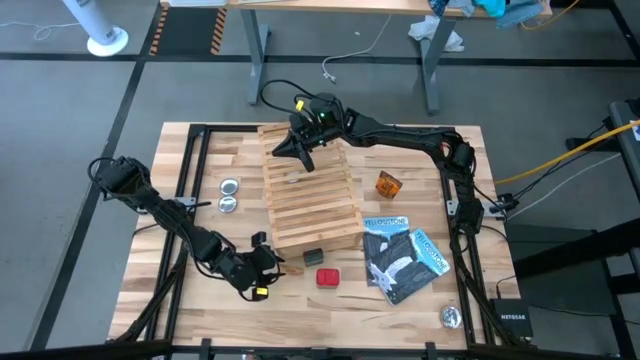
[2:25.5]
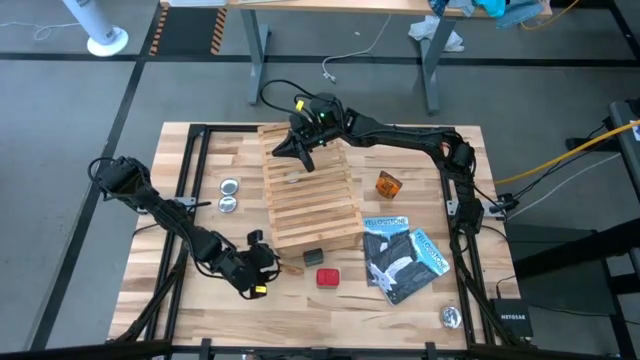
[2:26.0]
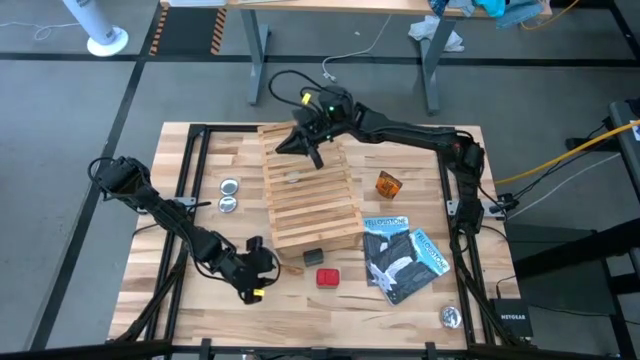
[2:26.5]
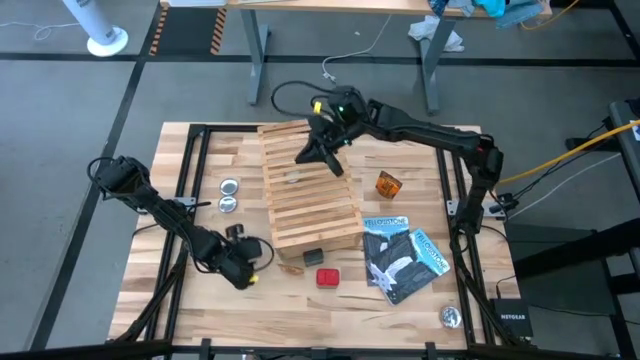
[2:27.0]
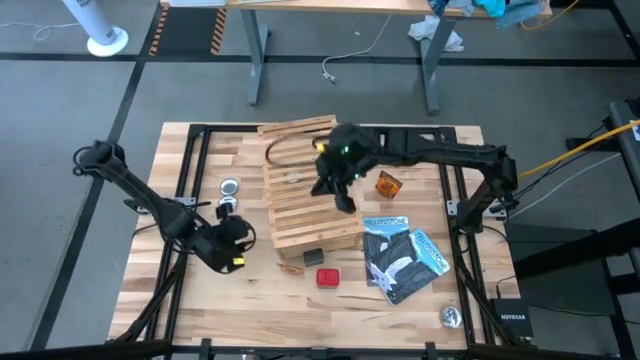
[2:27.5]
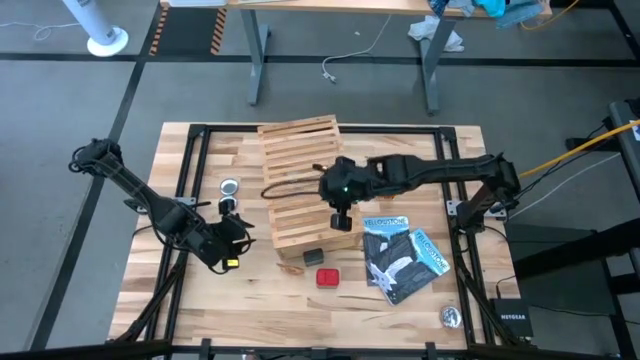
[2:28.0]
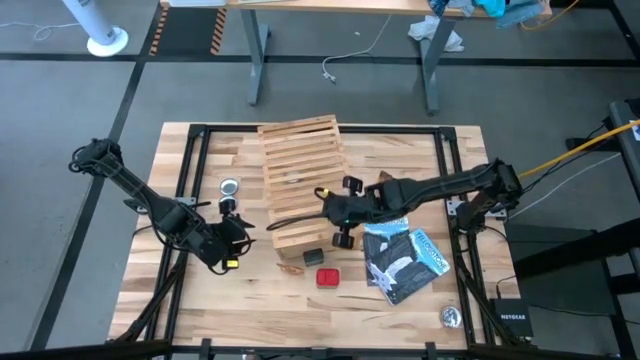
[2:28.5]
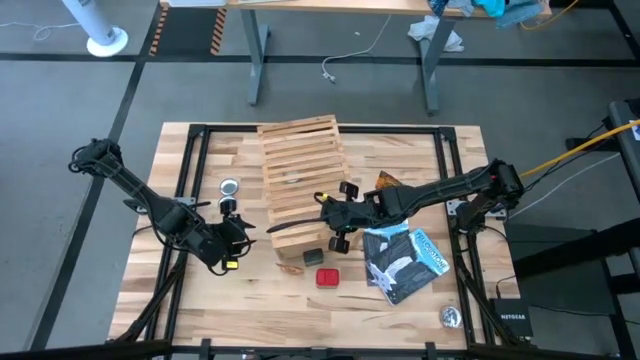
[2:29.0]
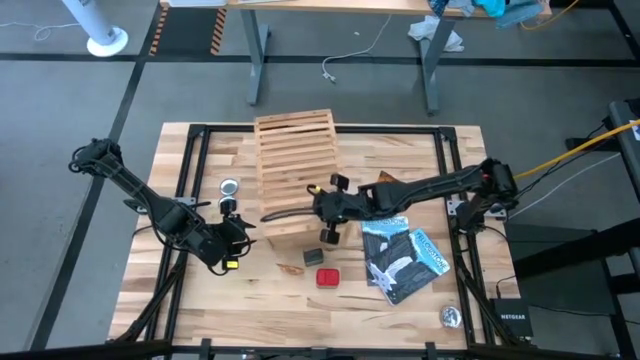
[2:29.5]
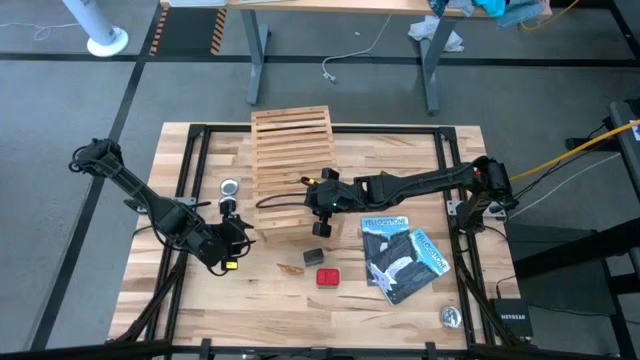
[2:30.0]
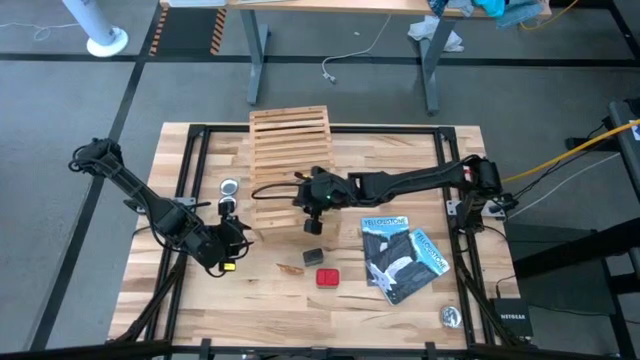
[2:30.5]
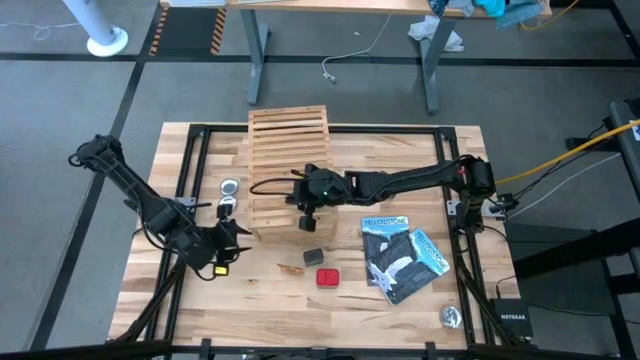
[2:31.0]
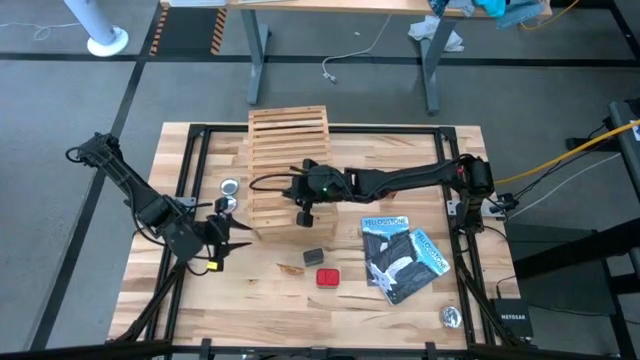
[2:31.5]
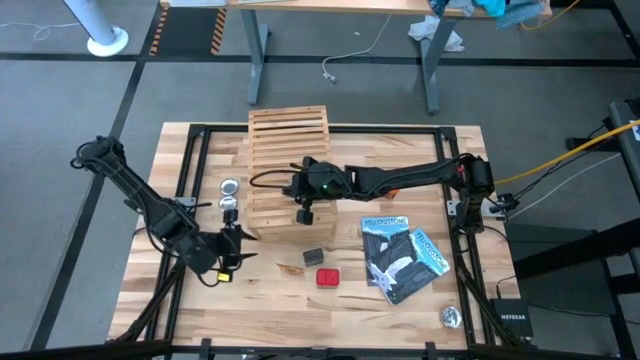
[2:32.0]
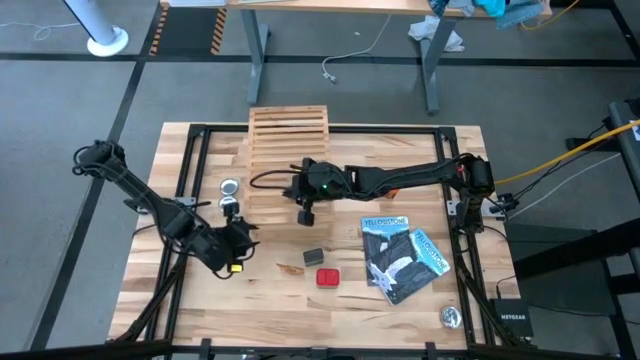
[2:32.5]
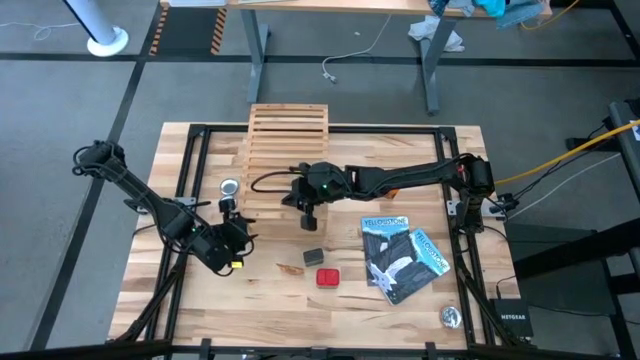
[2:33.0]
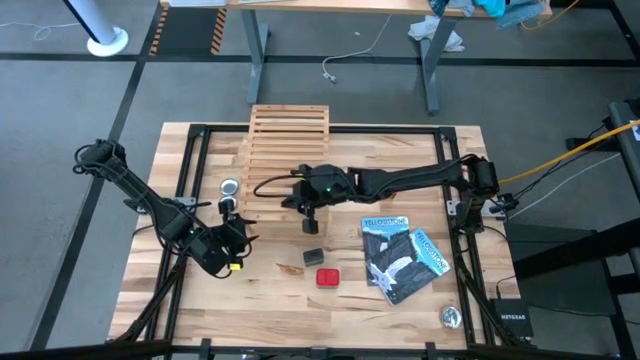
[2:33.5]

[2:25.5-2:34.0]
Task: Shelf spices
Adjust the shelf

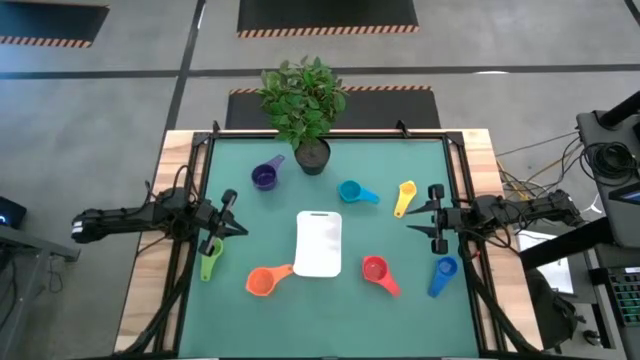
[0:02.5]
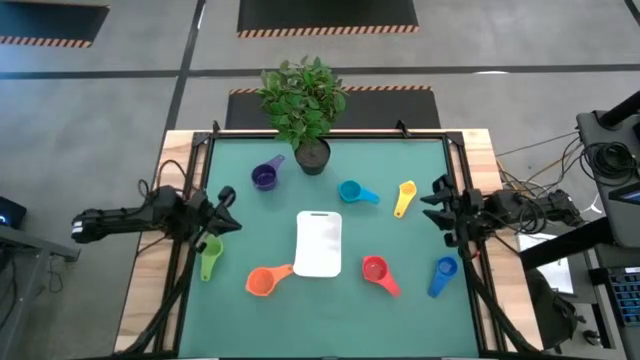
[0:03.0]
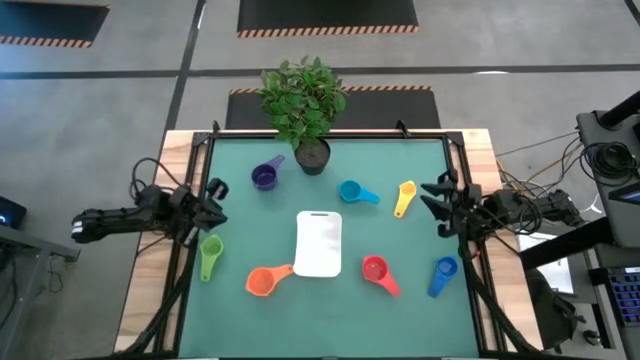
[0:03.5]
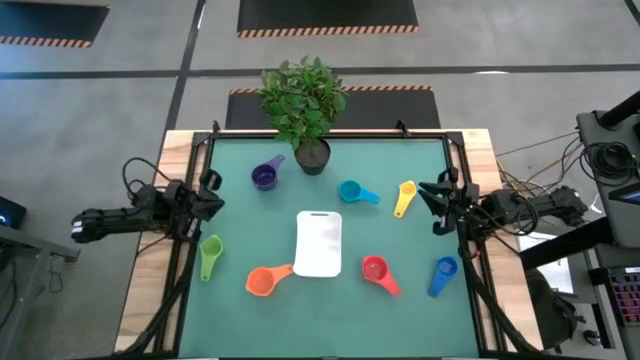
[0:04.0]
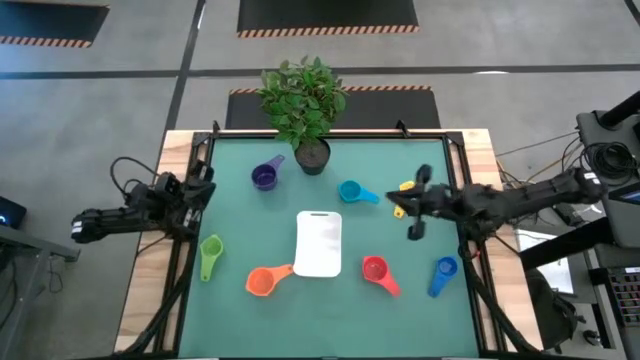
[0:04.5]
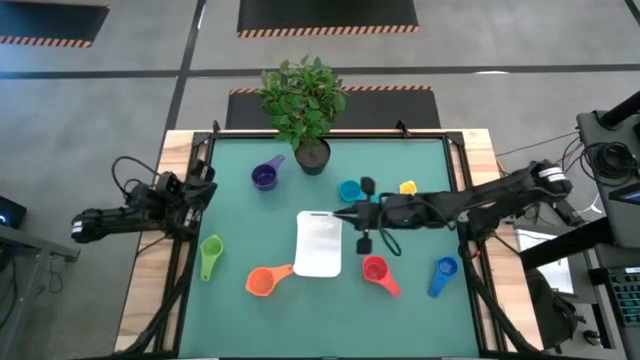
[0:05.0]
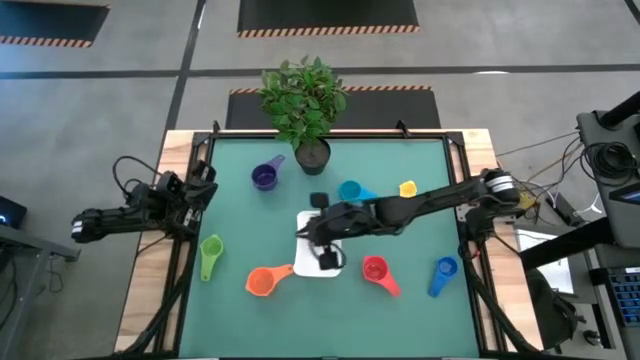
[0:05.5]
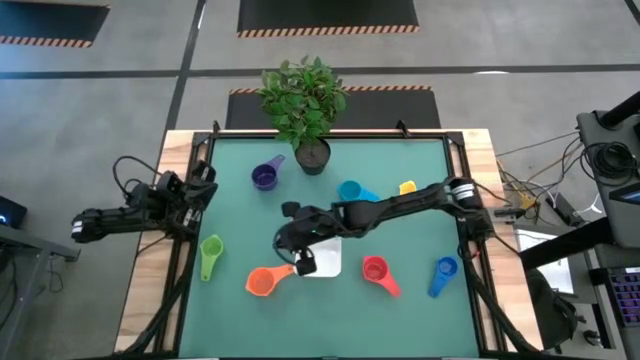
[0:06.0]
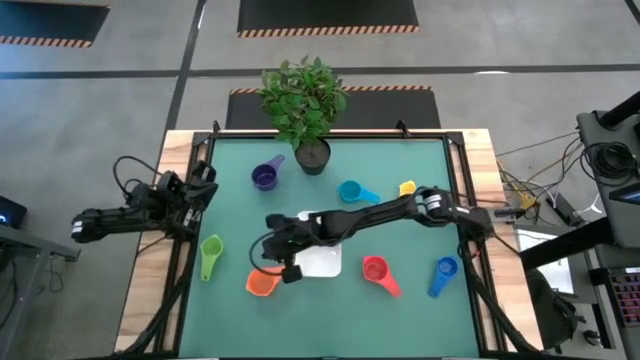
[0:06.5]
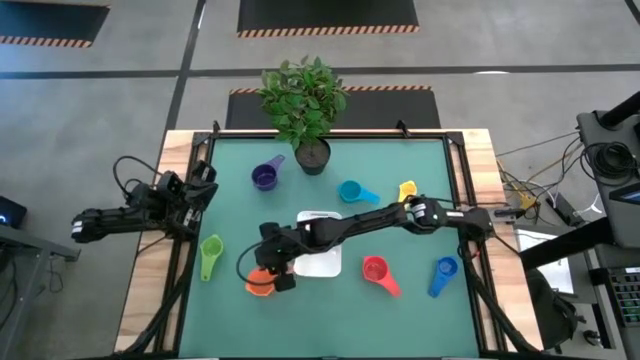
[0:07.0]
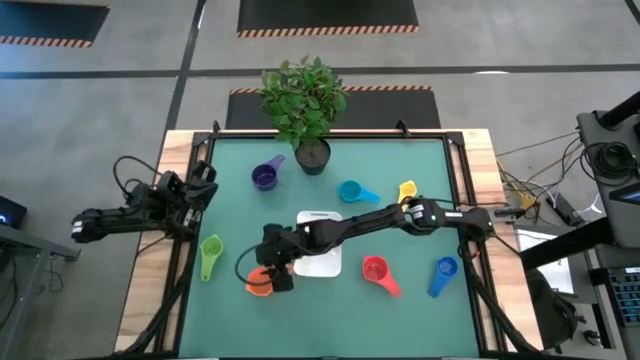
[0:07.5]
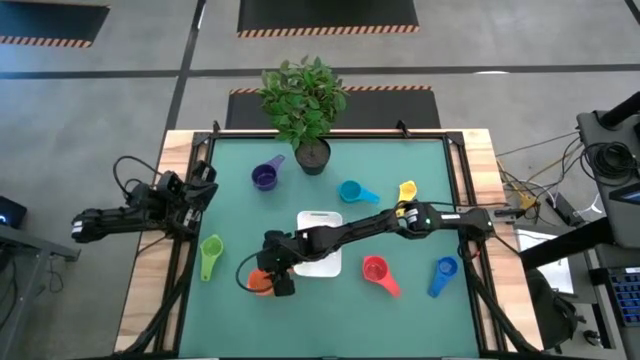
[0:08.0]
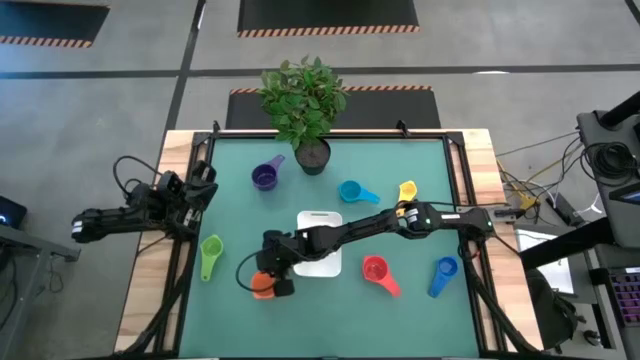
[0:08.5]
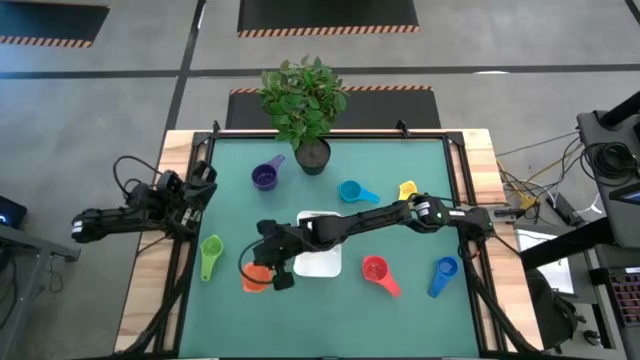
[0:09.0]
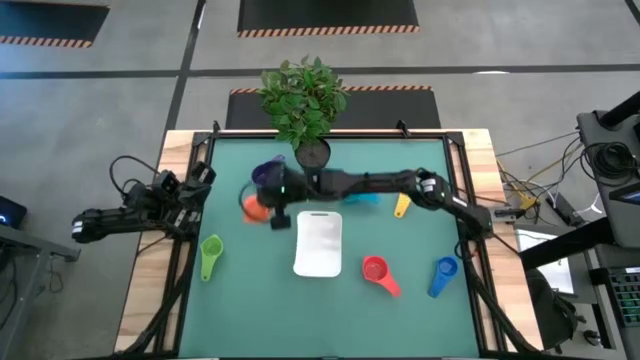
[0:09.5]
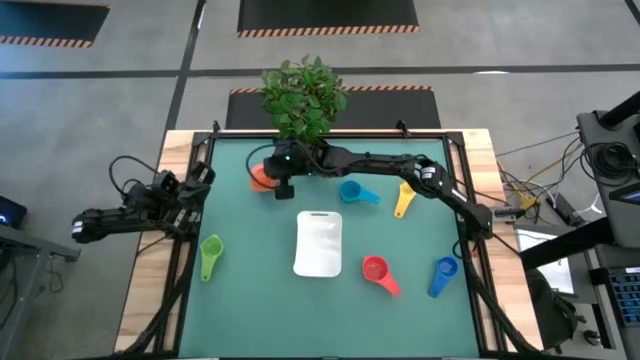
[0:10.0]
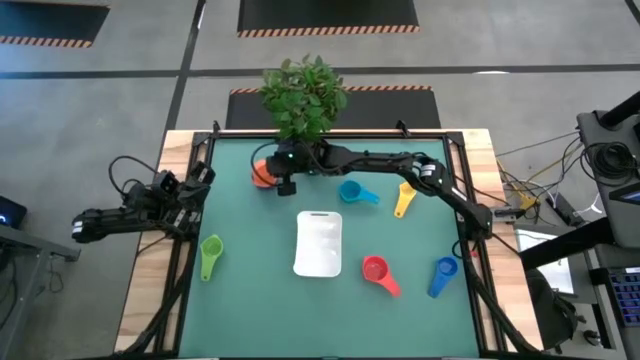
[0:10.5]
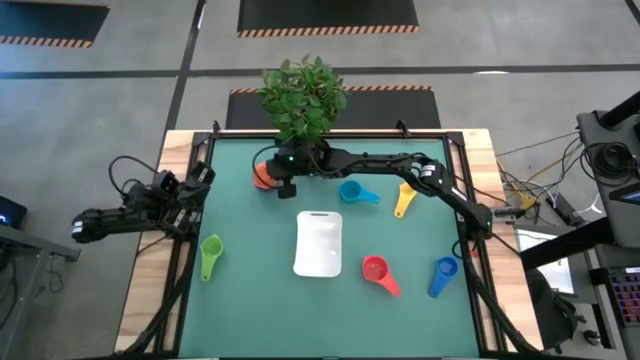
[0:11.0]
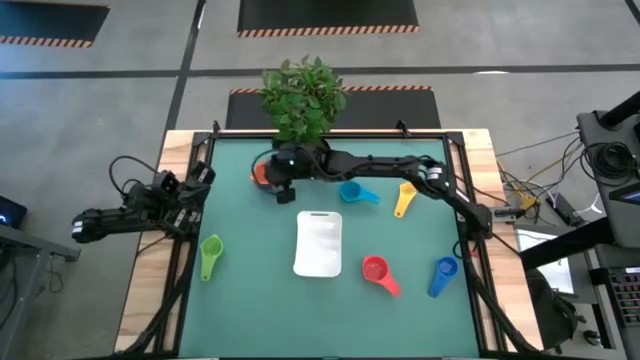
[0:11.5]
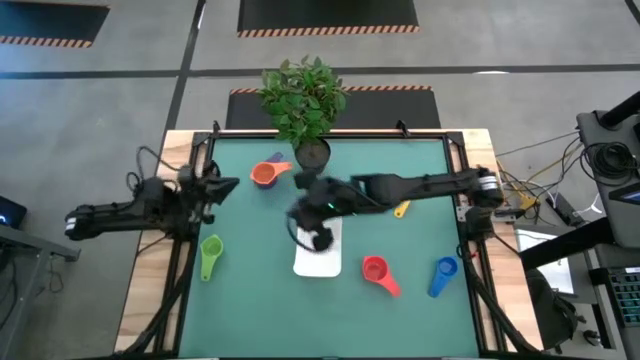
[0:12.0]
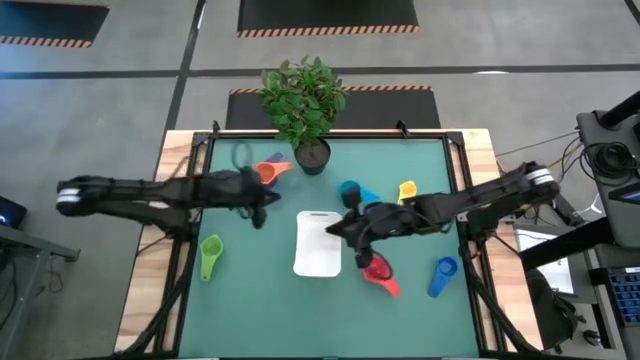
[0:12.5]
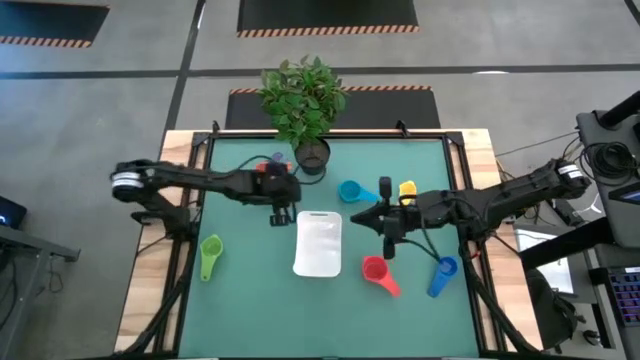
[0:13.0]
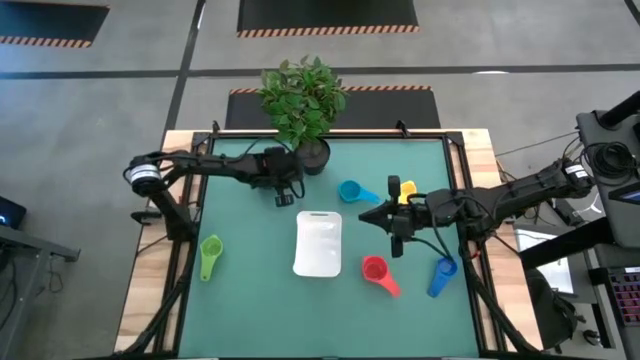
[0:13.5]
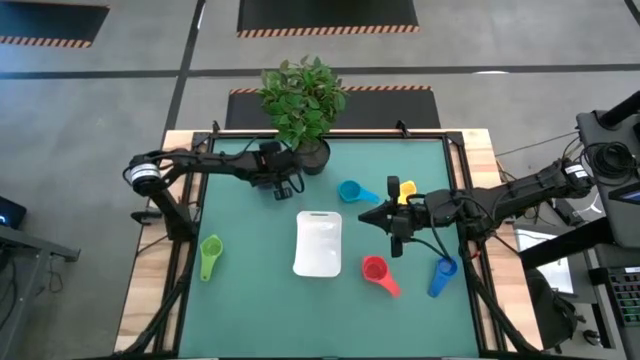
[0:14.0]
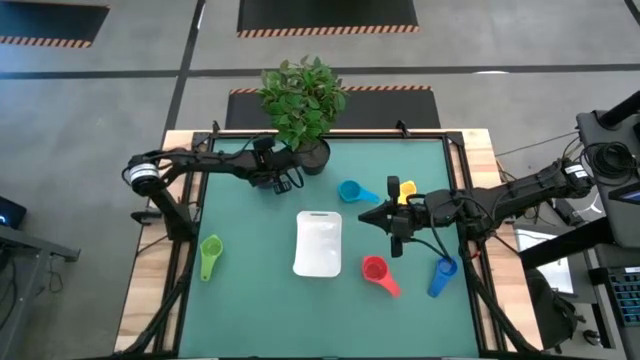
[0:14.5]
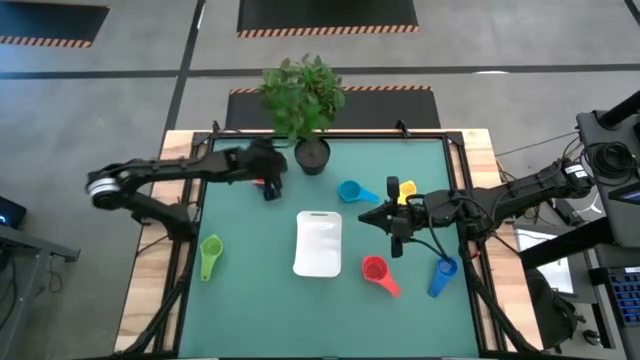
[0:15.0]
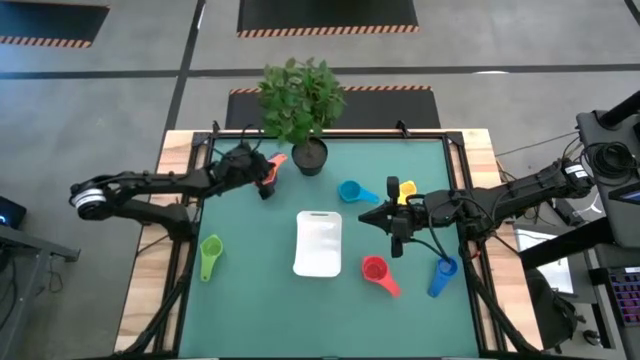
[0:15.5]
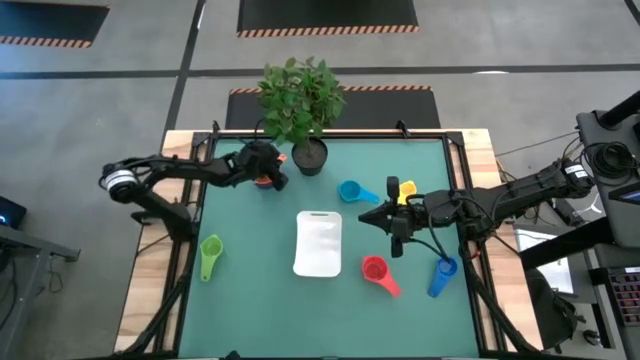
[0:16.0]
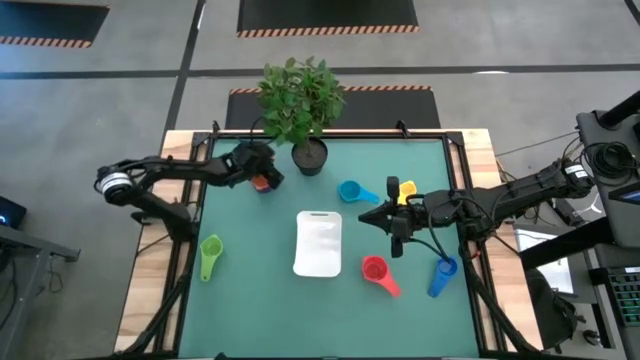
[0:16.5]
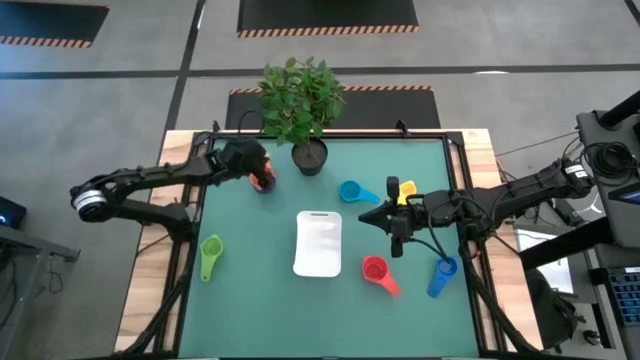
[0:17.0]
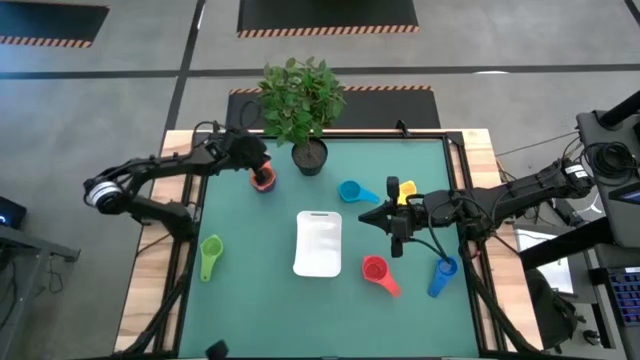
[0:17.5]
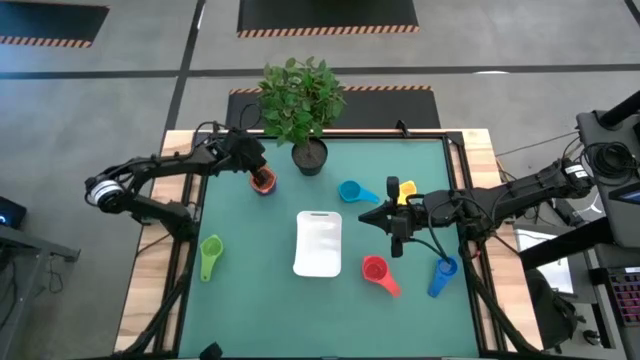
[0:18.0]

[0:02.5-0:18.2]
Task: Nest measuring cups in basket
Stack the orange measuring cup on top of the violet measuring cup
